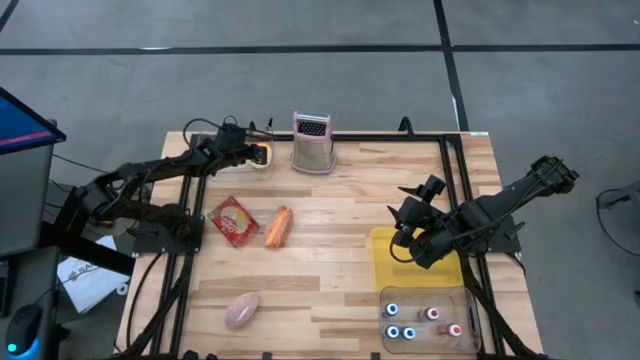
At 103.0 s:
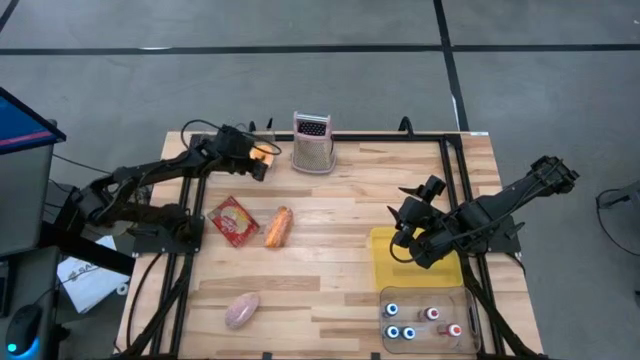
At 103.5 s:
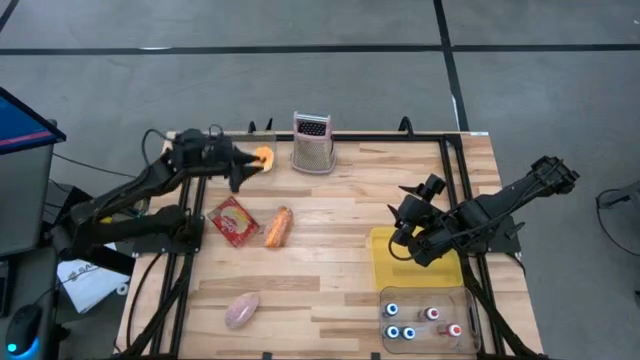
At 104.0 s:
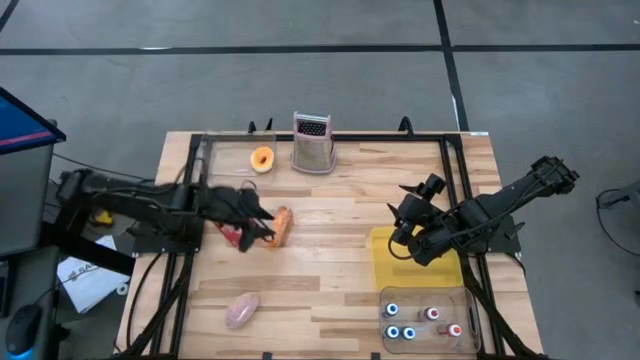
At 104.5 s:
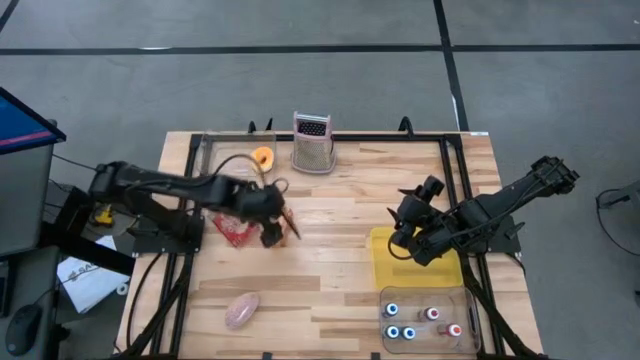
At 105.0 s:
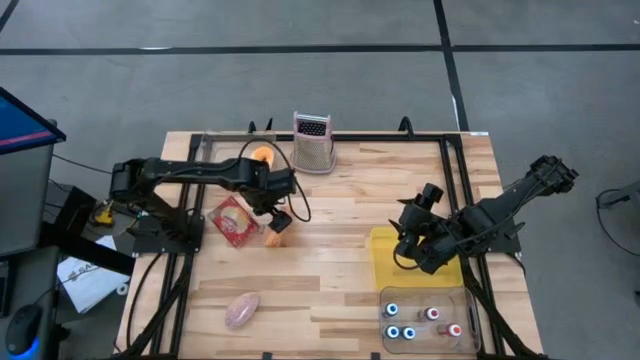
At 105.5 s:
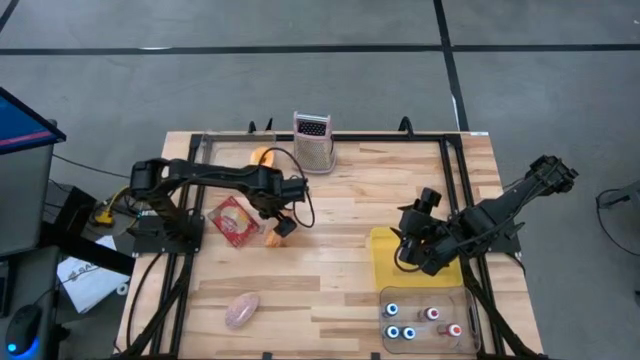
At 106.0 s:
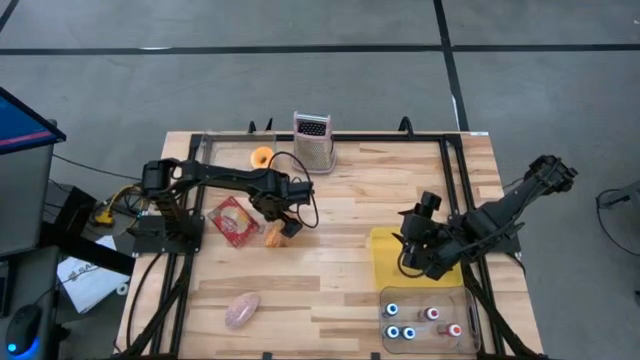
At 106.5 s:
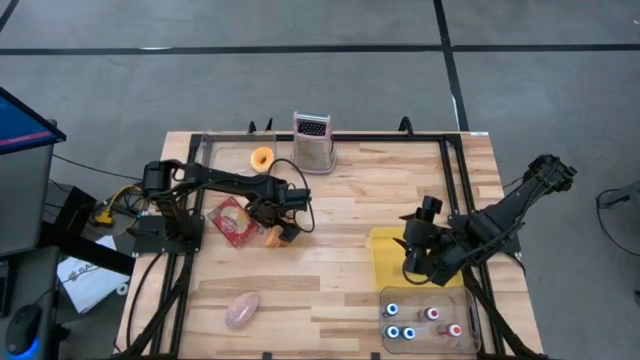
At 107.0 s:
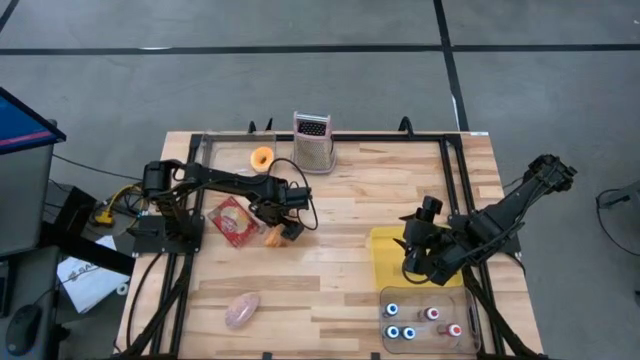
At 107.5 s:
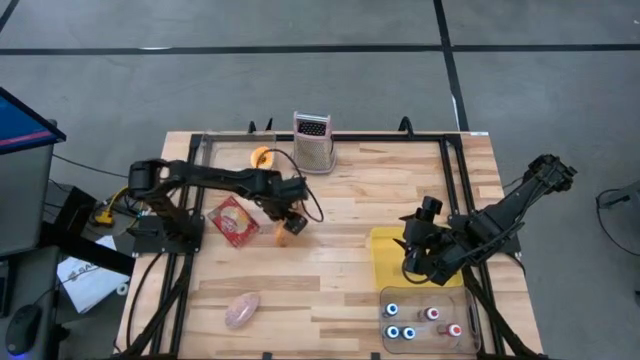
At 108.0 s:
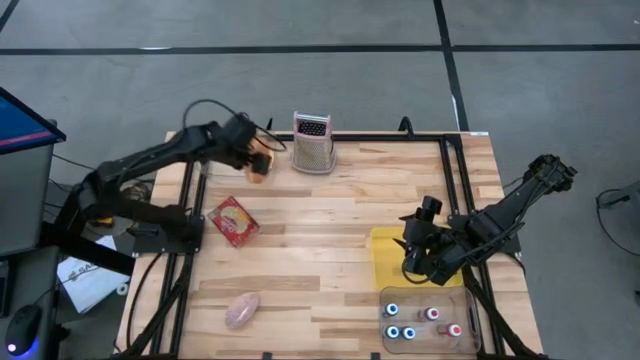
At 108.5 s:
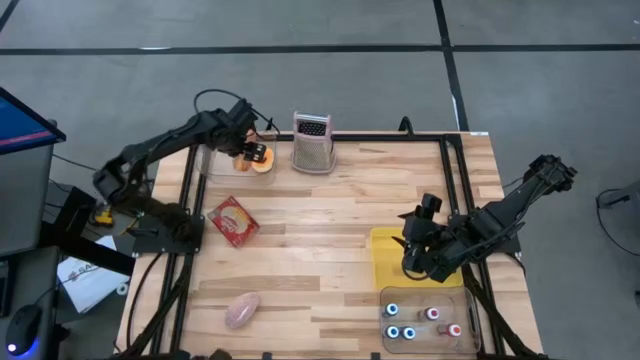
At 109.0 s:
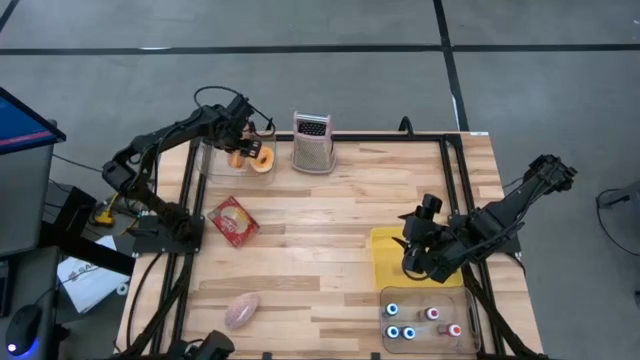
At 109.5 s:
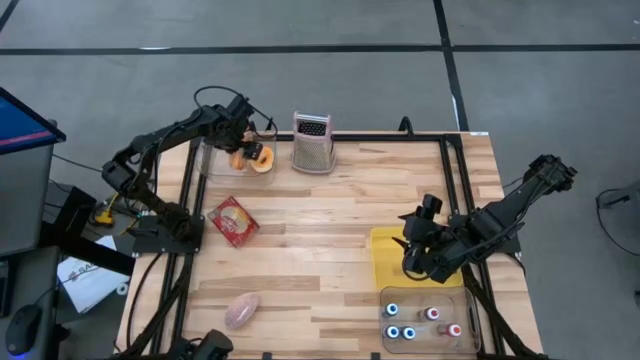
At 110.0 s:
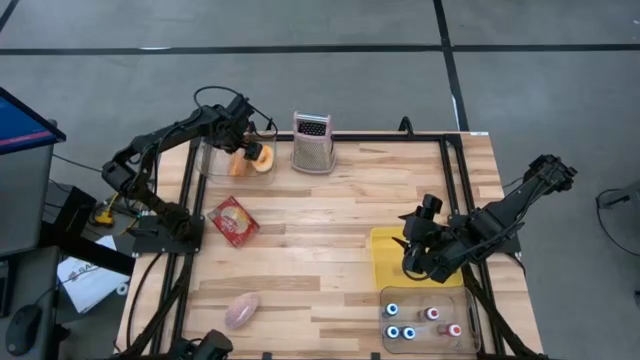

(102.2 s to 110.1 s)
Task: Pick & Place Food Item
Put the top bear claw into the top transparent bin

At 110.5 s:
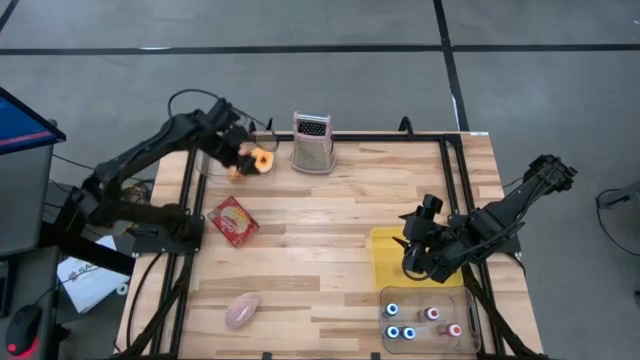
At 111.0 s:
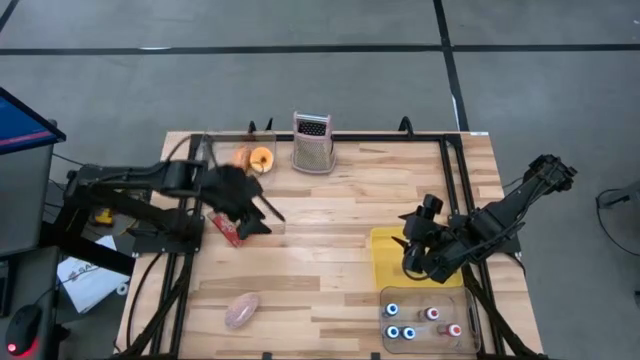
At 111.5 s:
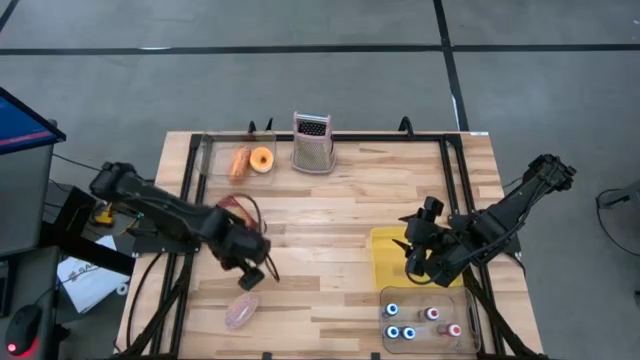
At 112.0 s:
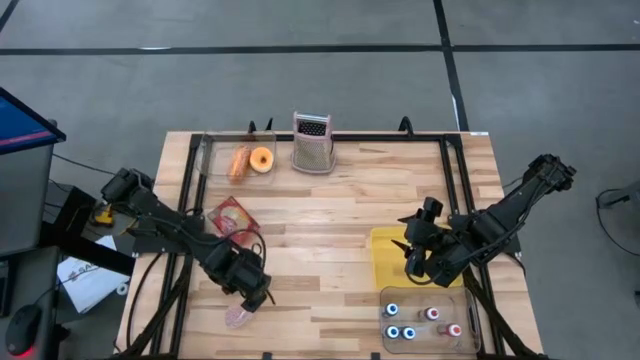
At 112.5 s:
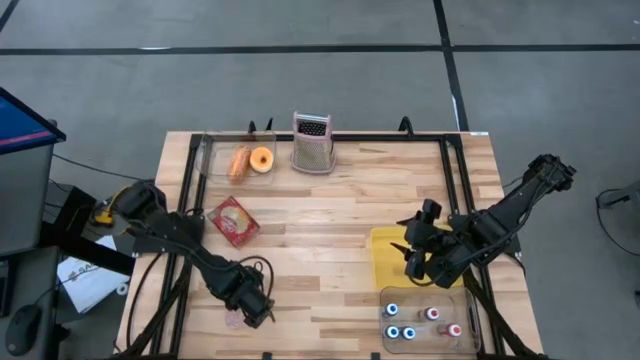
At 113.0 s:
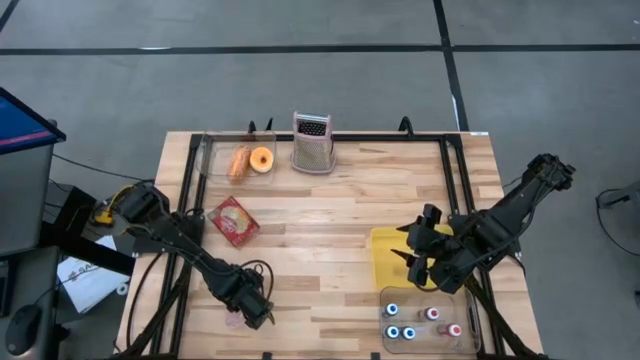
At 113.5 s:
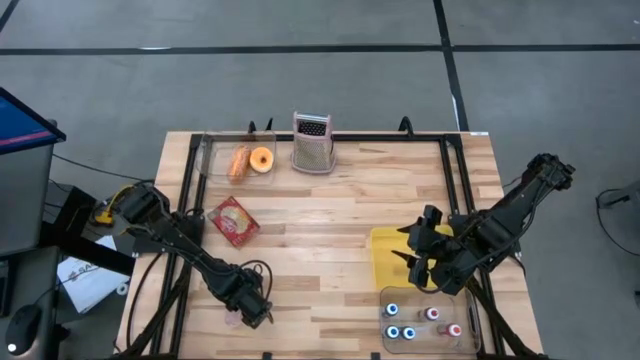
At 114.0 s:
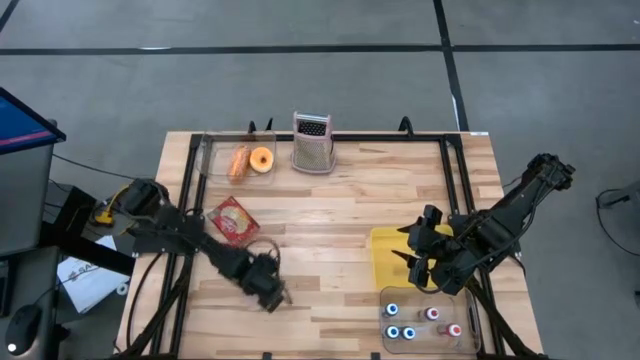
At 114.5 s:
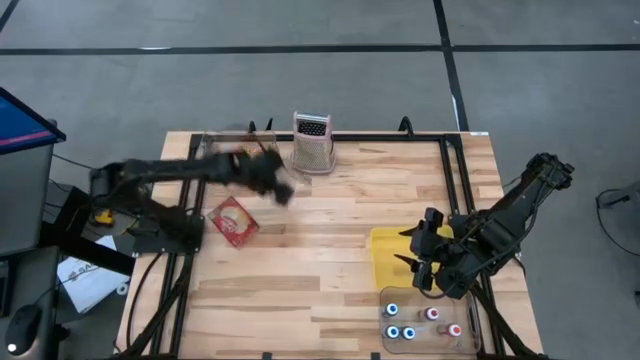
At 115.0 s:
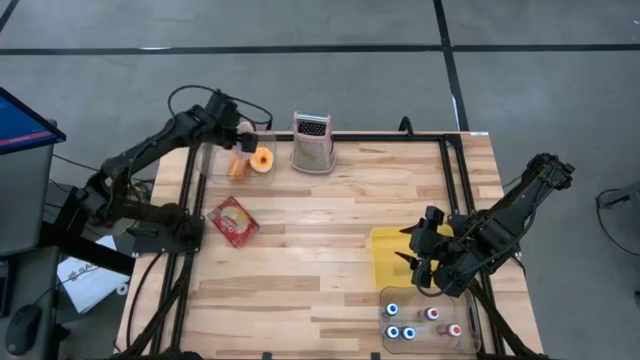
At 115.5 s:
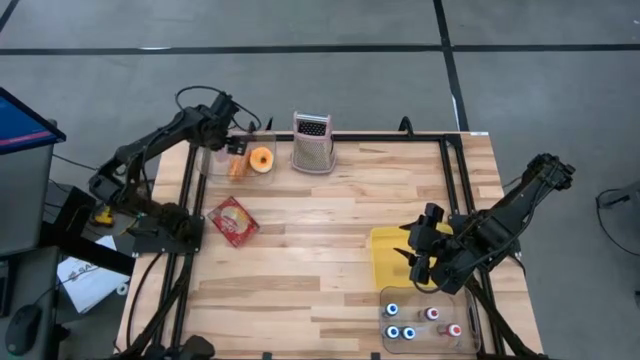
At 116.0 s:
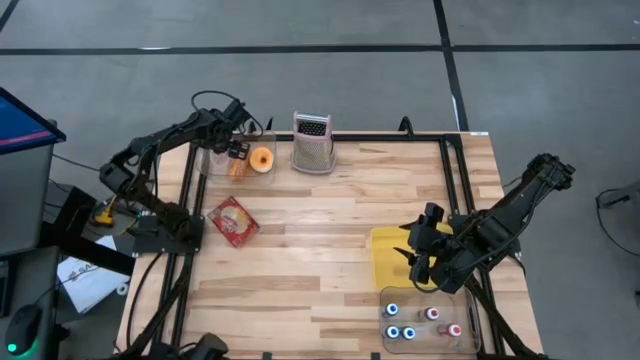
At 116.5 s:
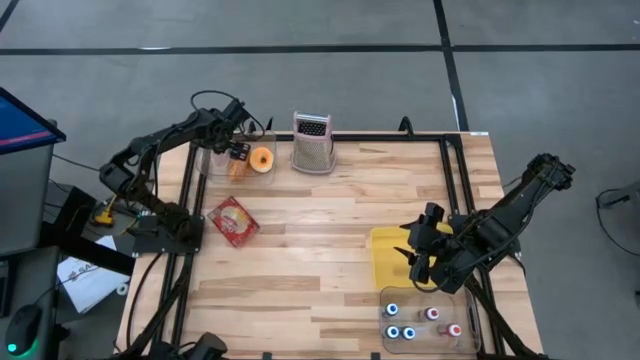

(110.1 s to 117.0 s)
Put the bear claw into the top transparent bin

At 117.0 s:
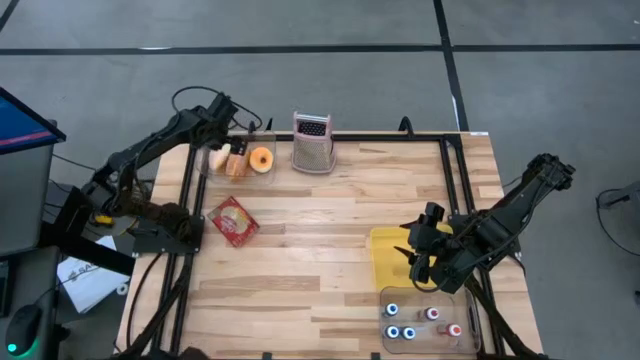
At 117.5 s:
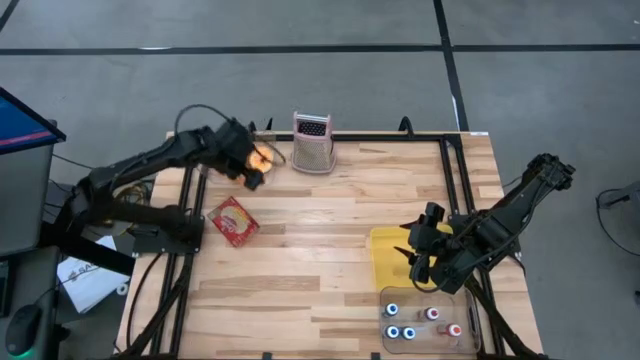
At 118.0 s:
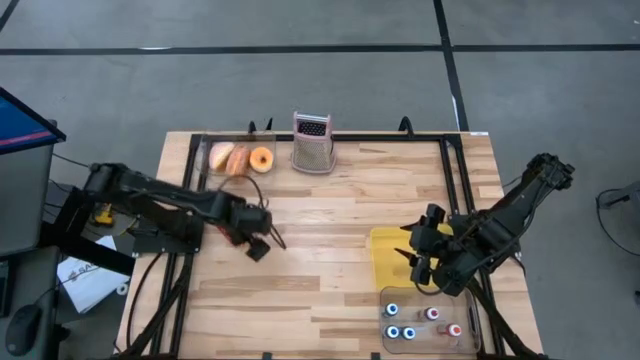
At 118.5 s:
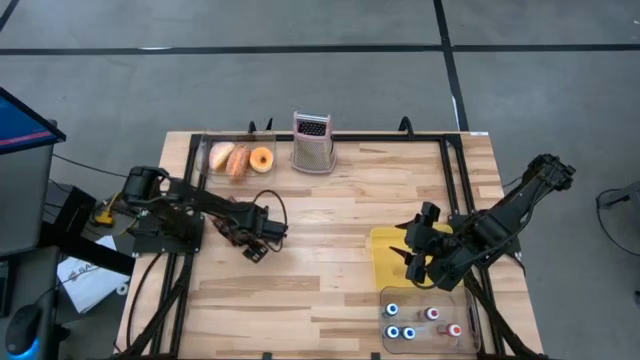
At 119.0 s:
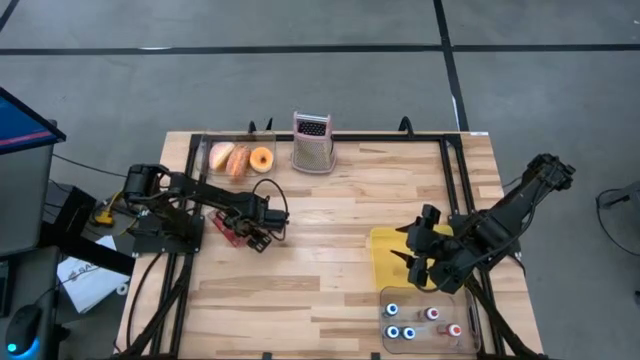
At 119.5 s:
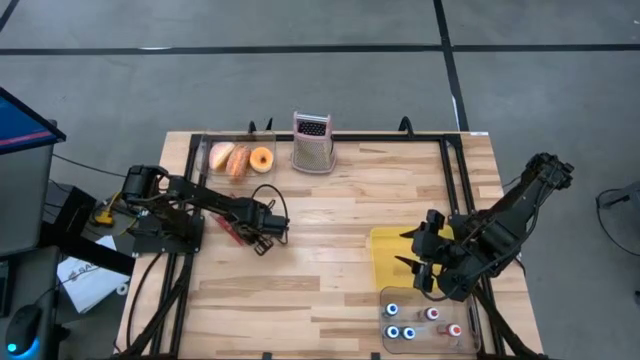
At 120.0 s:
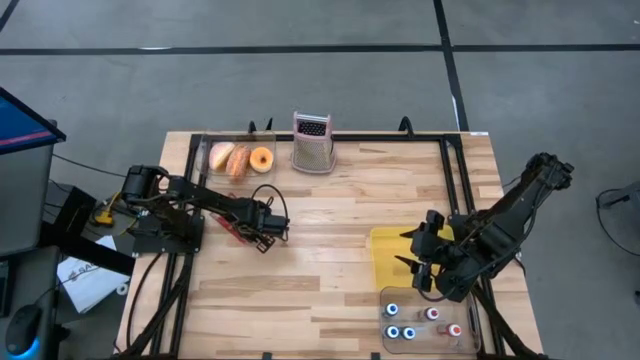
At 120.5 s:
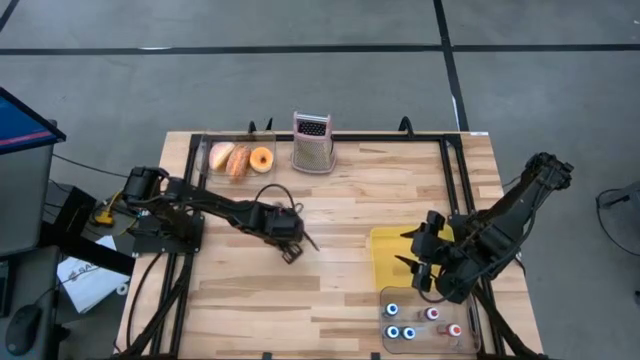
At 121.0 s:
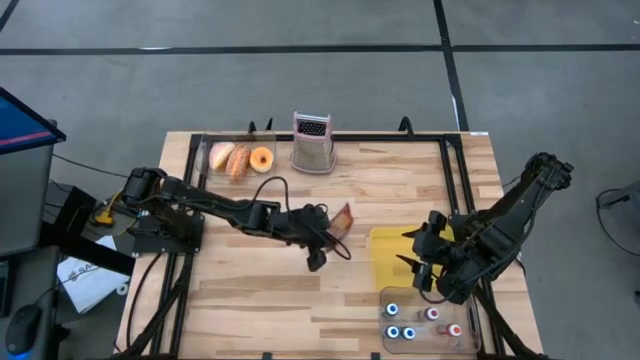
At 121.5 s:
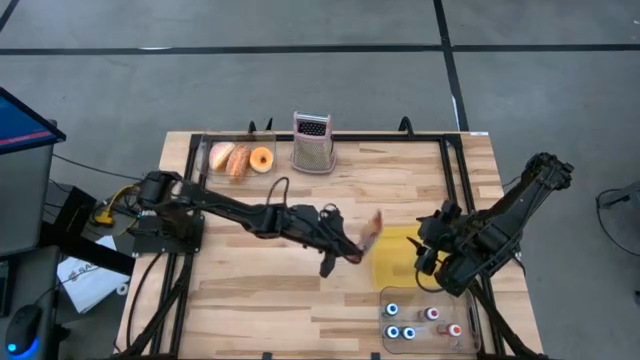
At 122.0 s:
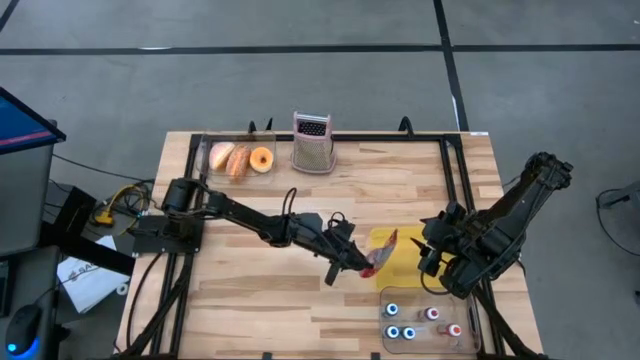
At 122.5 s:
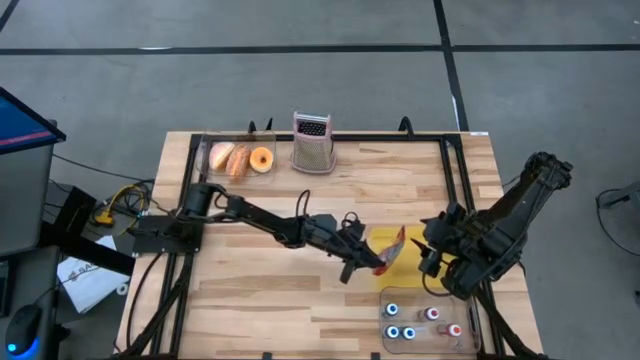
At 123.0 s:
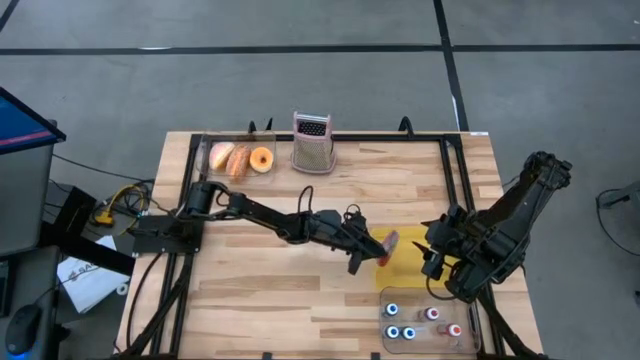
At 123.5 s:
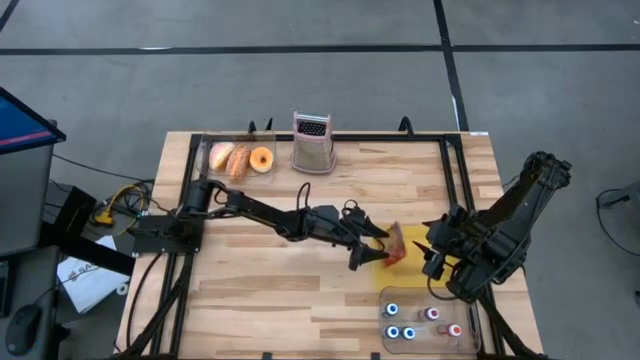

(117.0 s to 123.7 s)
Put the red popcorn bag into the yellow bin
